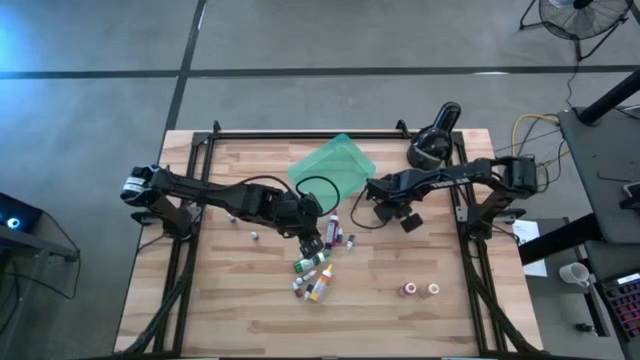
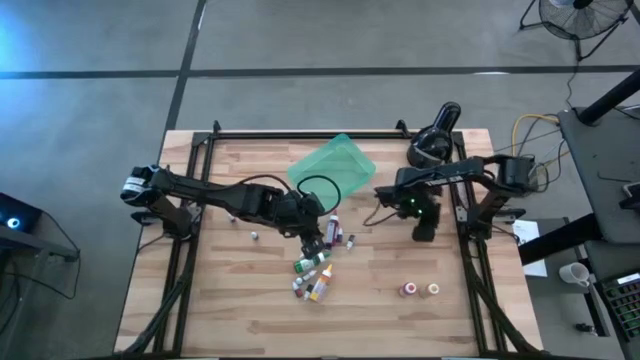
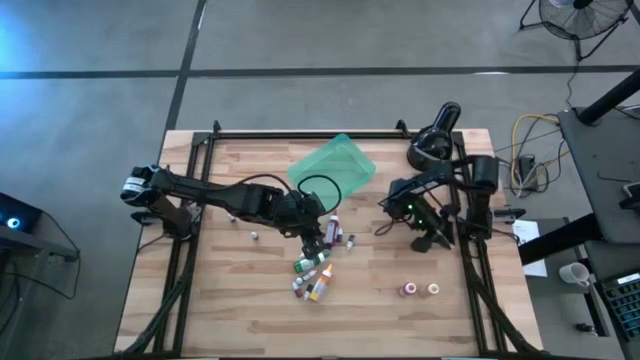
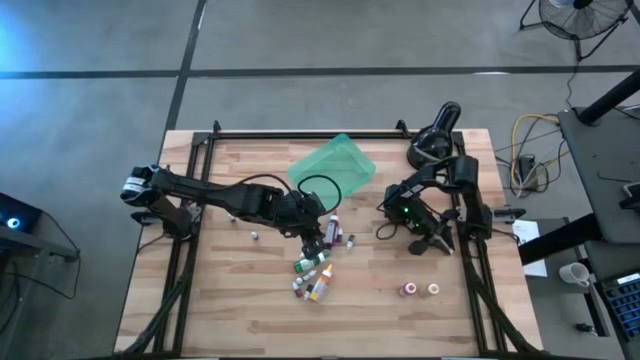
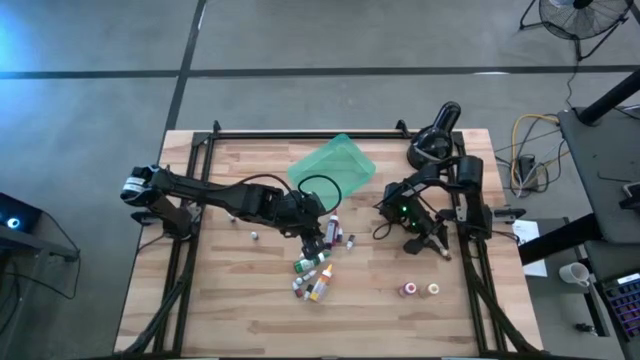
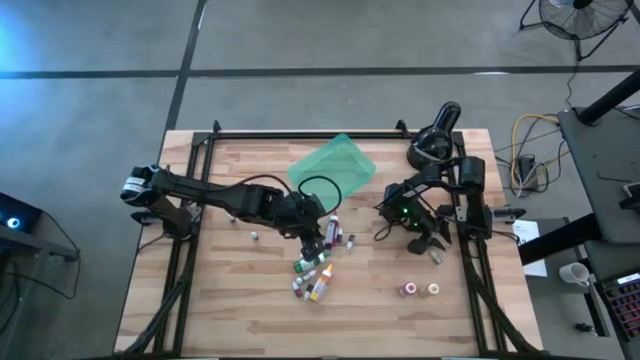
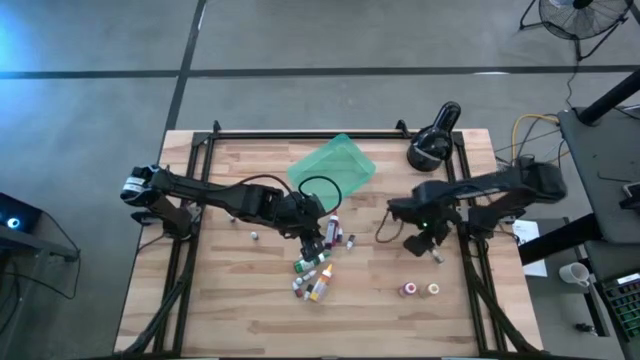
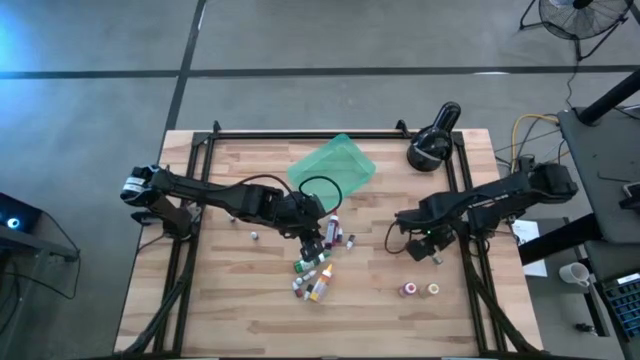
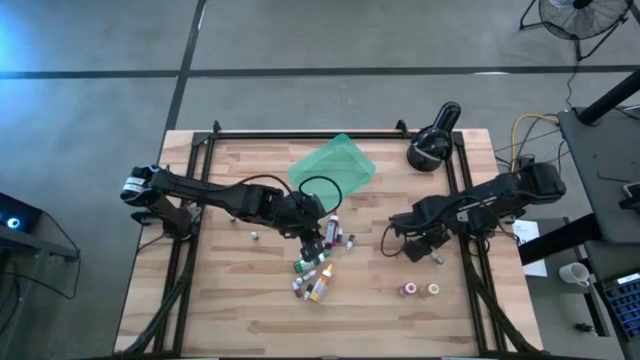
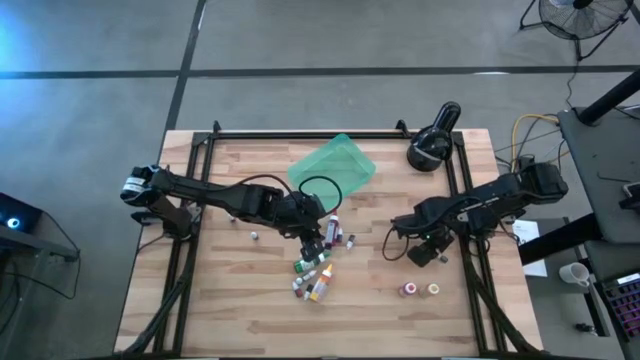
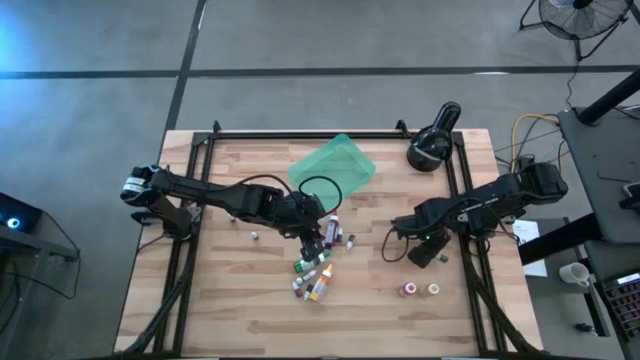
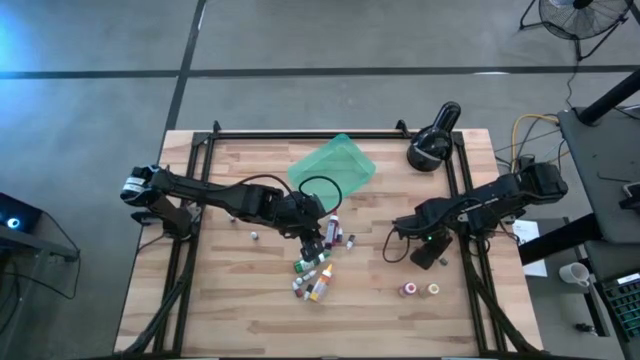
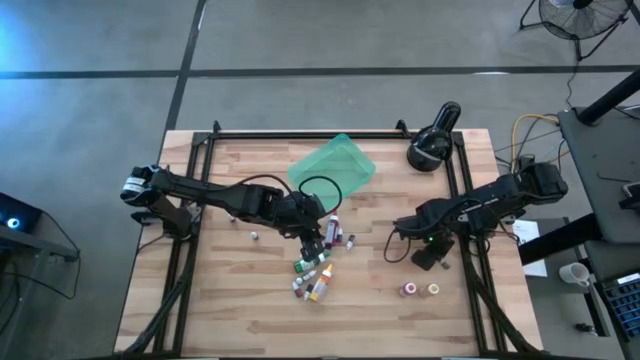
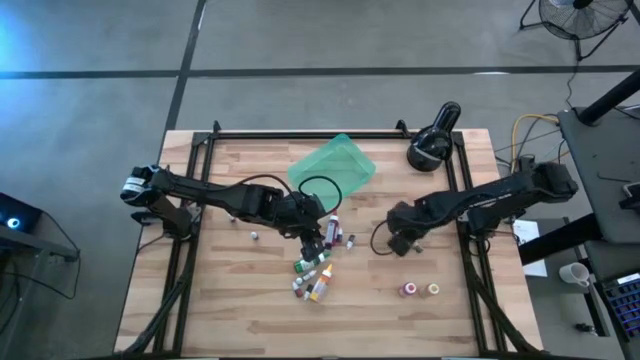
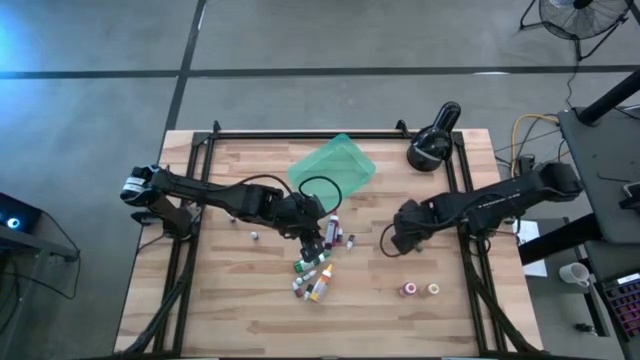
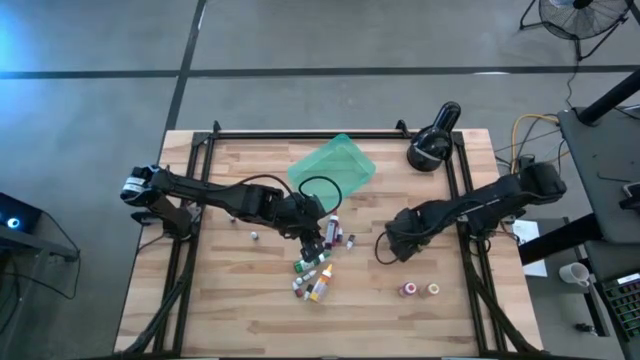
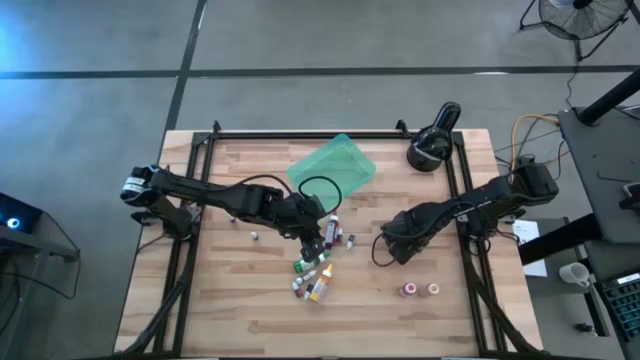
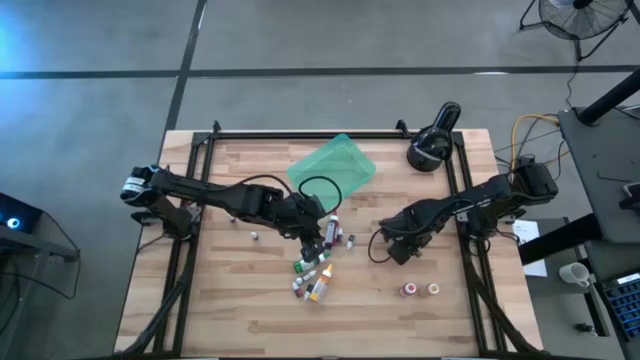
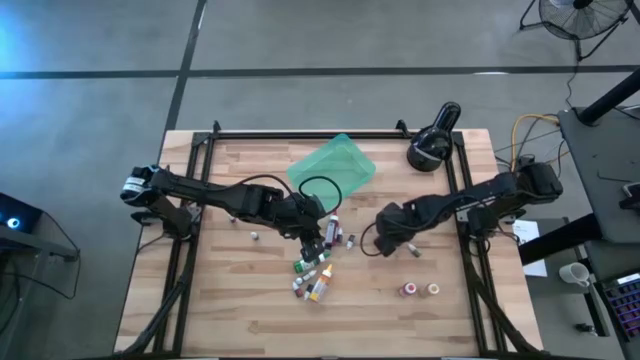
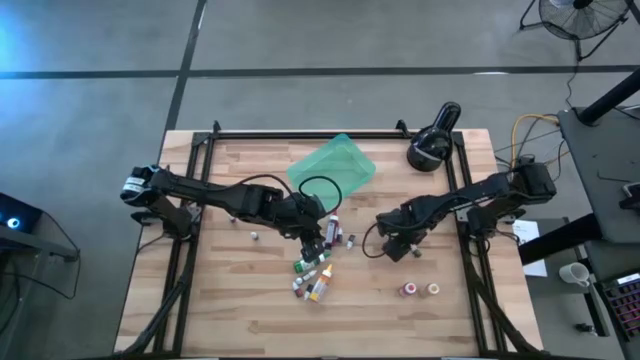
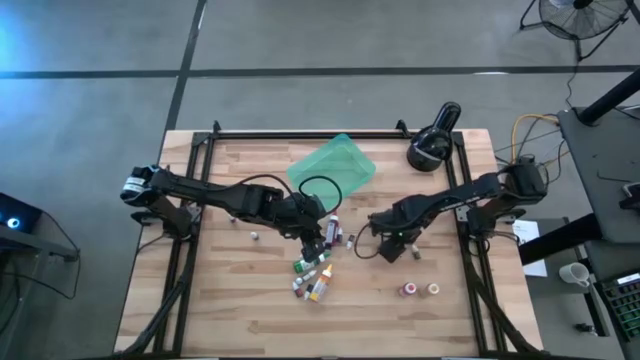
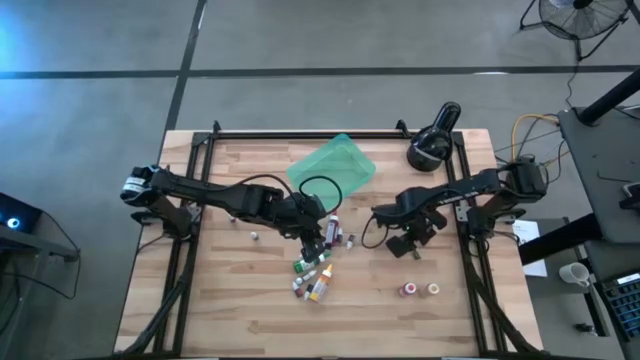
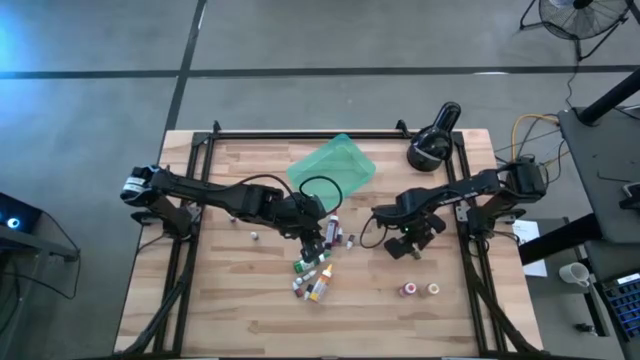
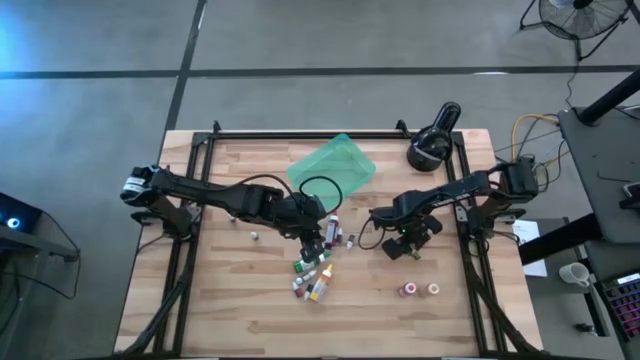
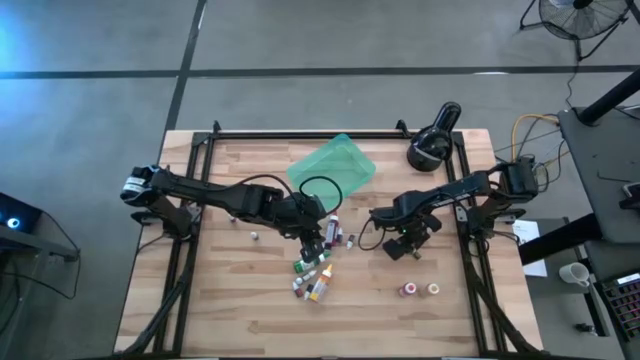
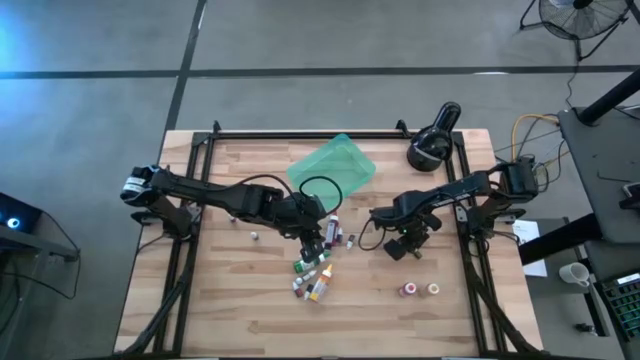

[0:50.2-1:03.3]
Task: Pick & Place food coloring
Adjust the green small food coloring bottle

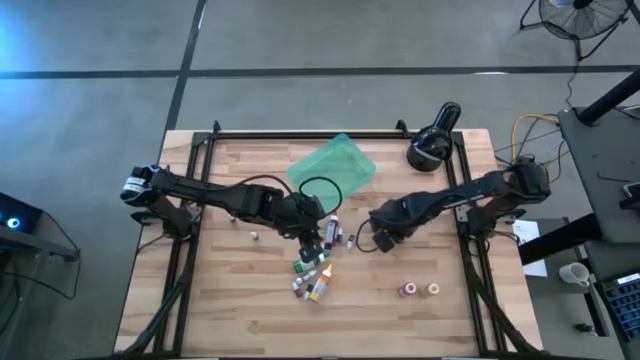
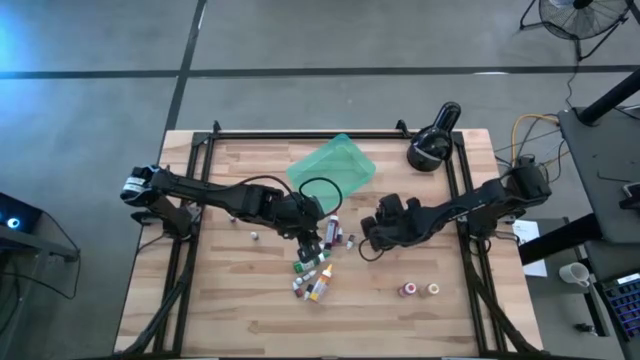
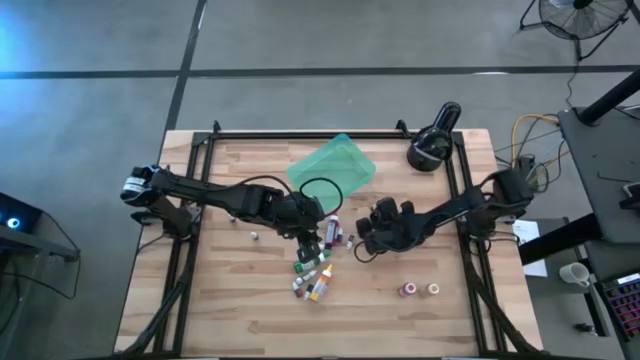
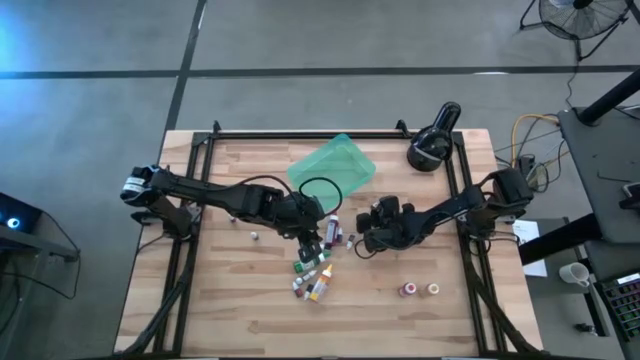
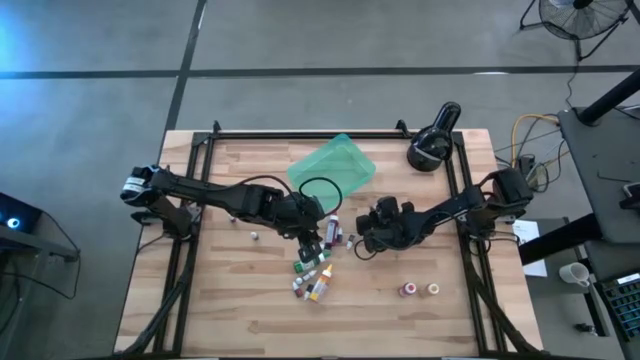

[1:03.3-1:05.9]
Adjust the black small food coloring bottle

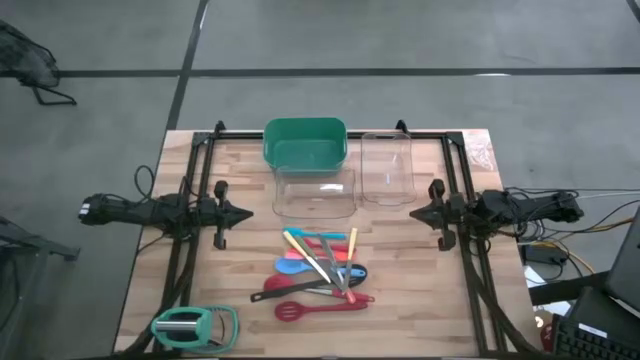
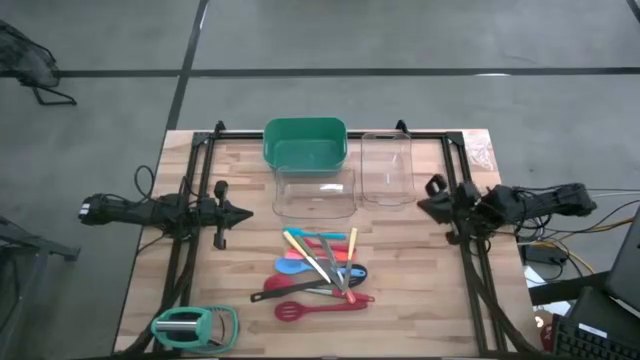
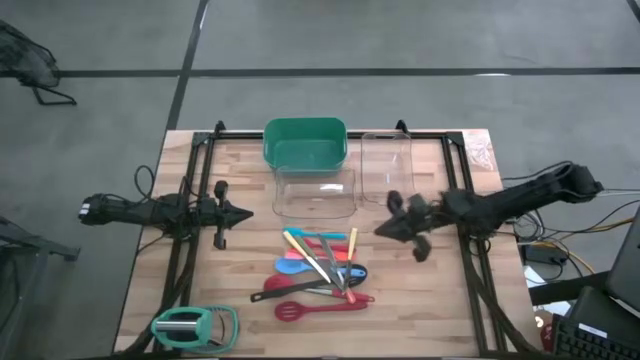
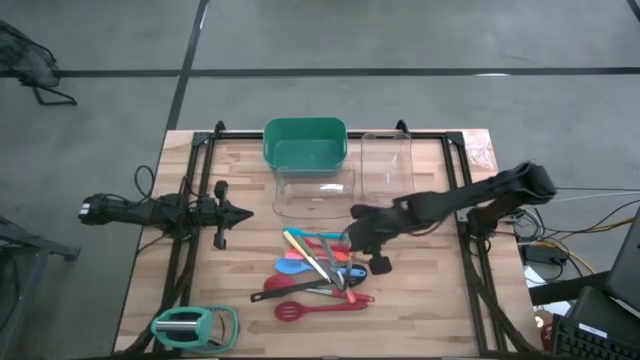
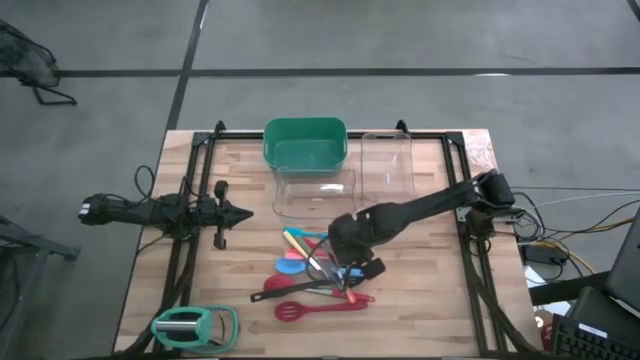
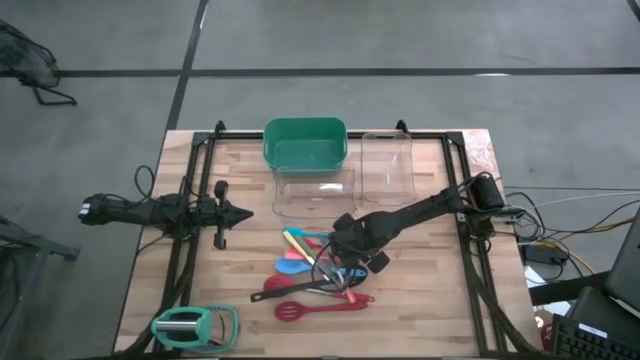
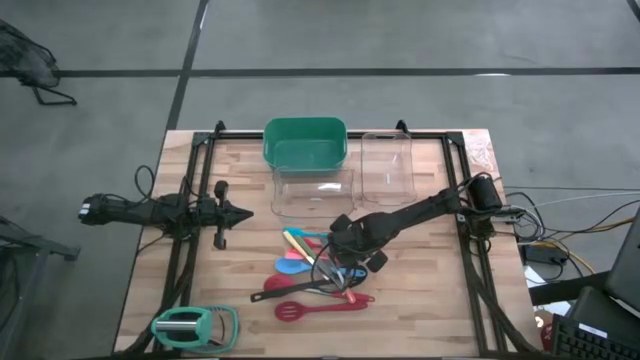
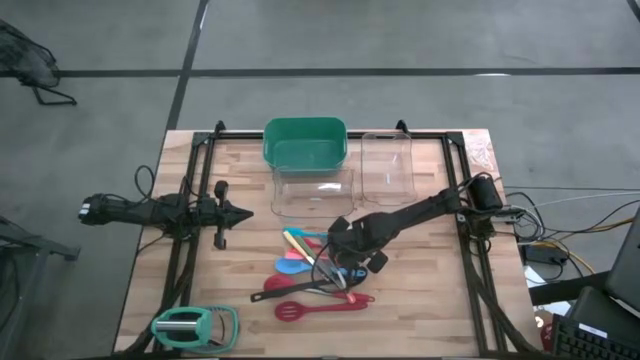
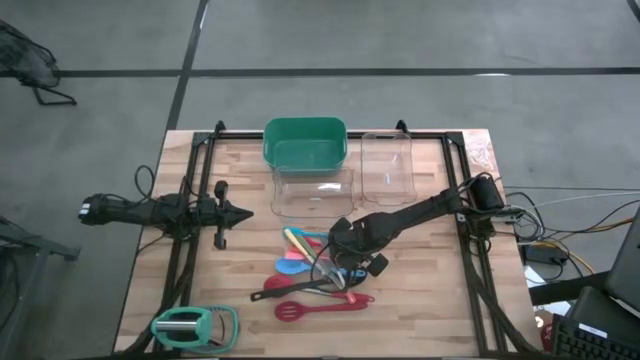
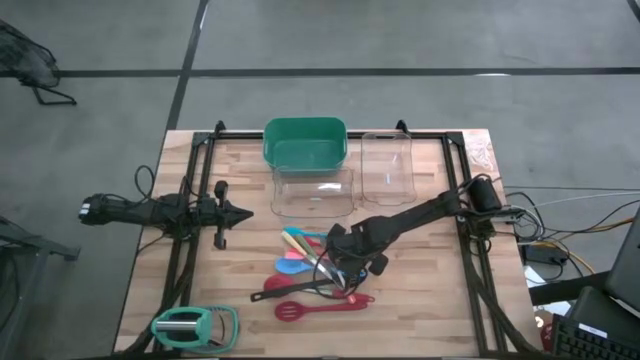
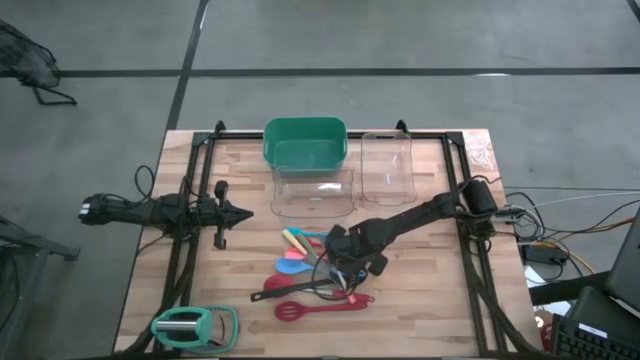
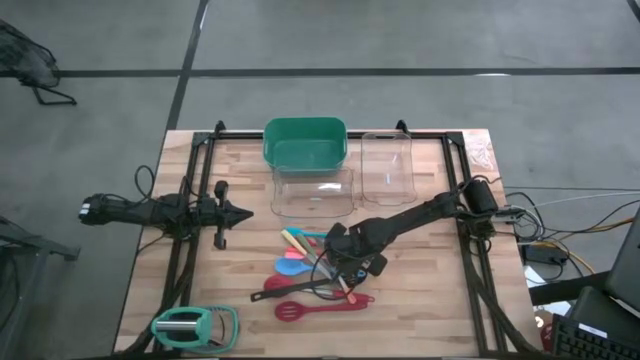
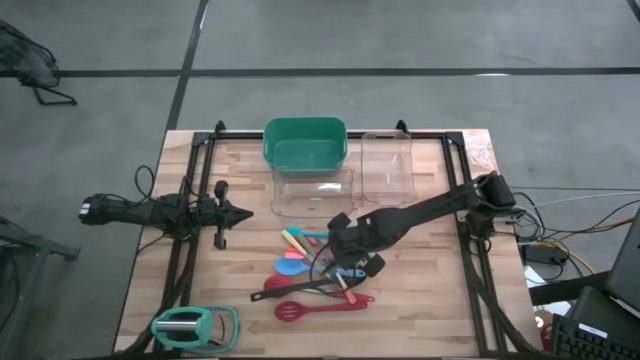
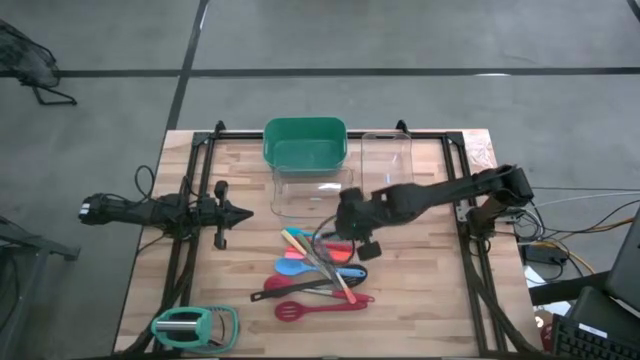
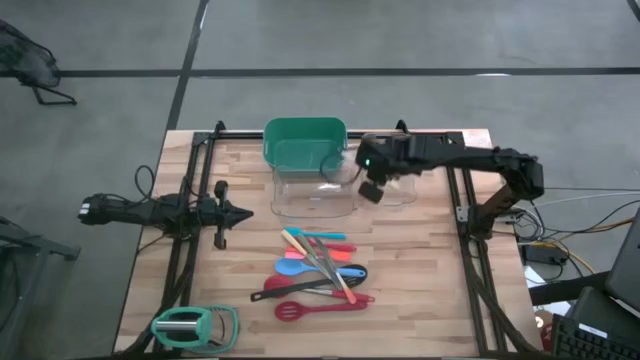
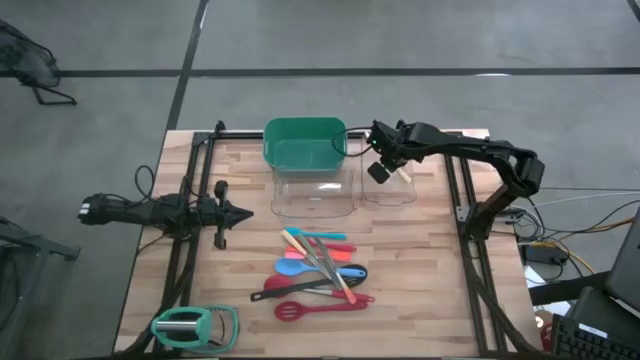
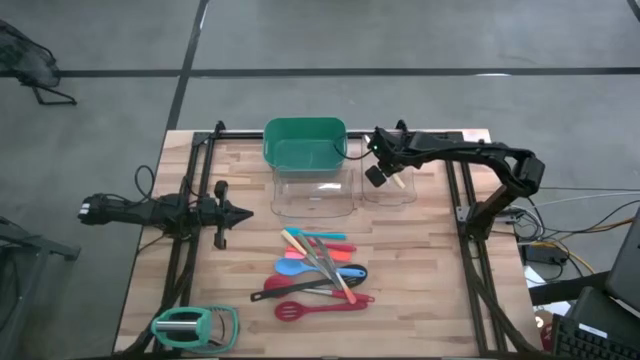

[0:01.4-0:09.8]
Task: Pick & Place Kitchen Items
Put the yellow knife into the right transparent bin
